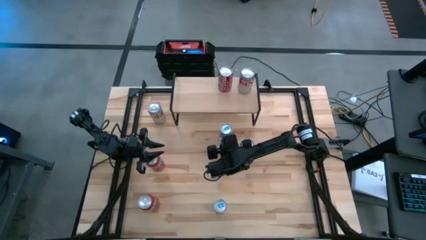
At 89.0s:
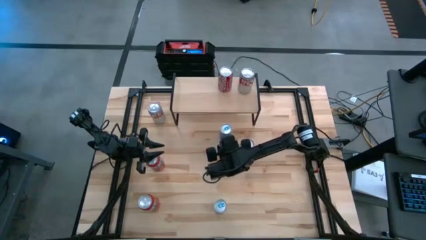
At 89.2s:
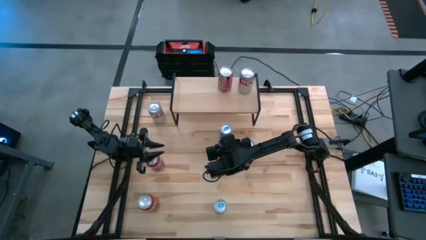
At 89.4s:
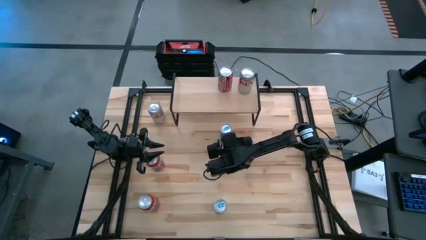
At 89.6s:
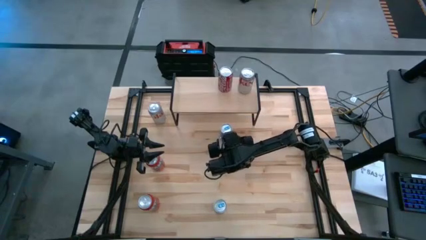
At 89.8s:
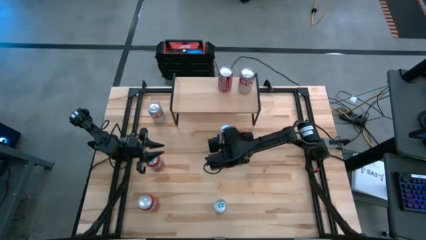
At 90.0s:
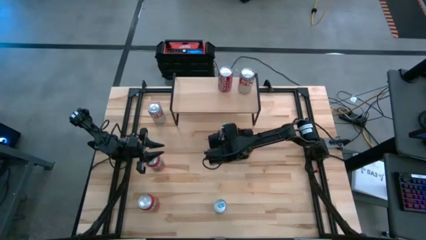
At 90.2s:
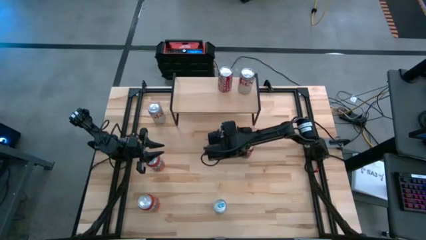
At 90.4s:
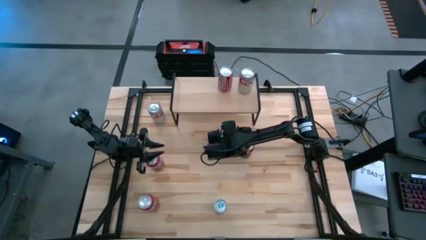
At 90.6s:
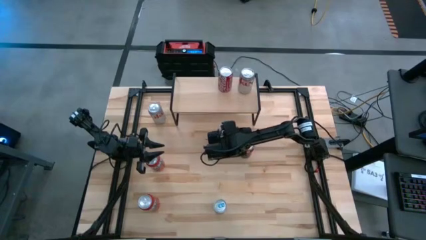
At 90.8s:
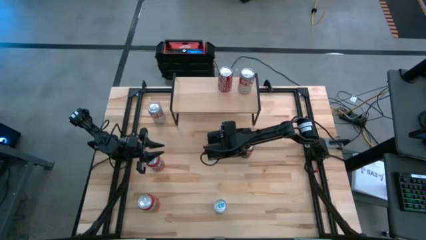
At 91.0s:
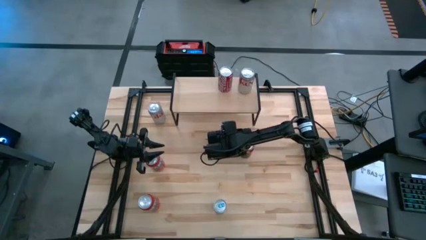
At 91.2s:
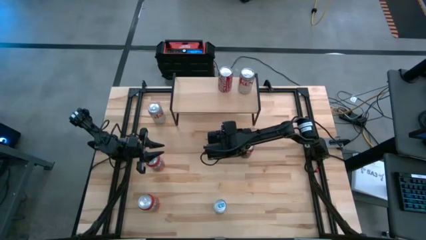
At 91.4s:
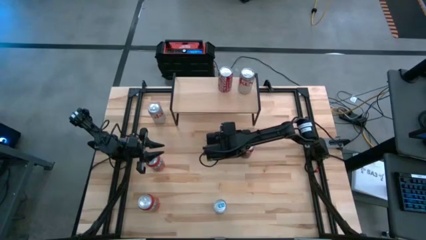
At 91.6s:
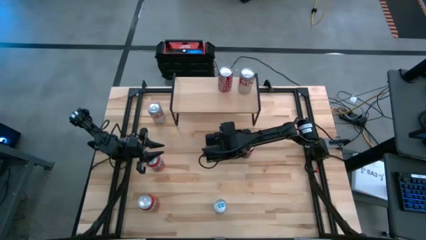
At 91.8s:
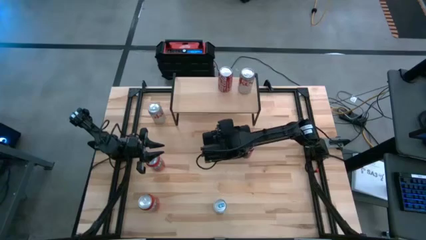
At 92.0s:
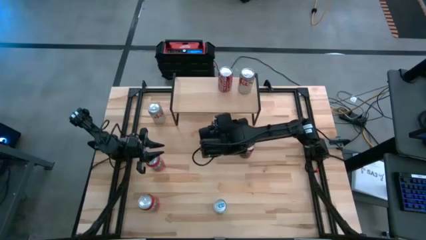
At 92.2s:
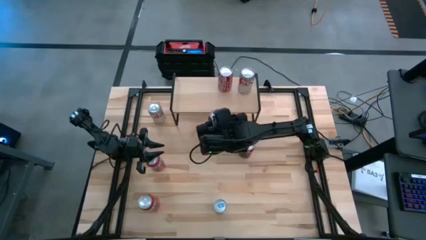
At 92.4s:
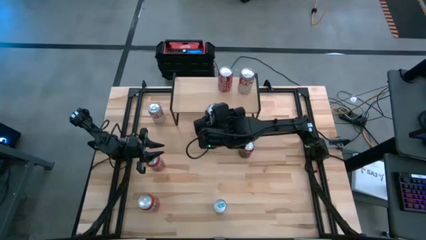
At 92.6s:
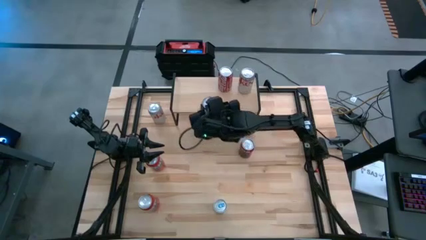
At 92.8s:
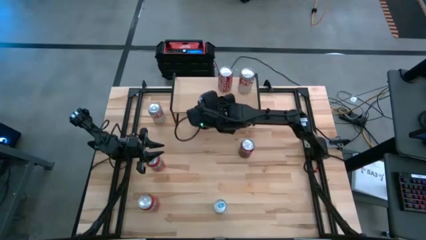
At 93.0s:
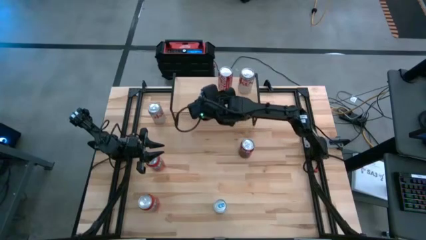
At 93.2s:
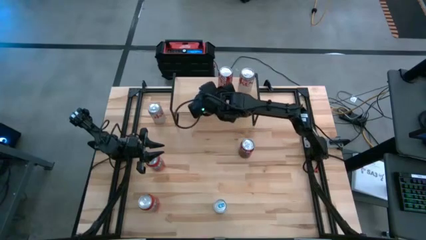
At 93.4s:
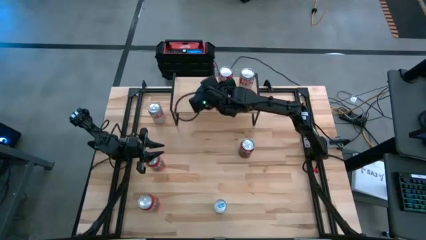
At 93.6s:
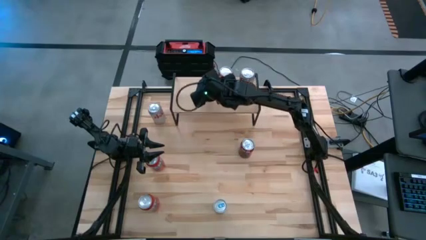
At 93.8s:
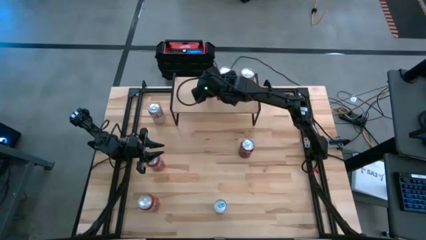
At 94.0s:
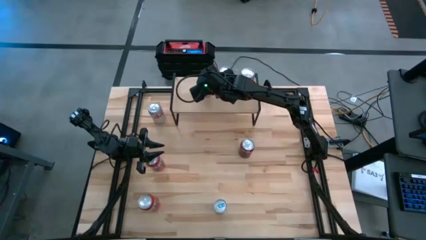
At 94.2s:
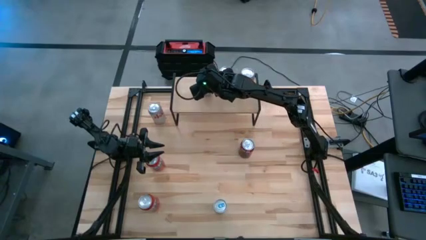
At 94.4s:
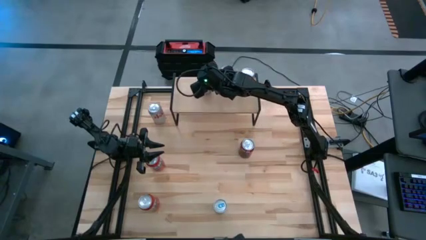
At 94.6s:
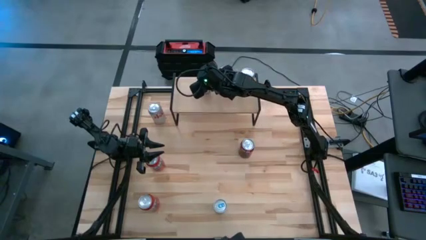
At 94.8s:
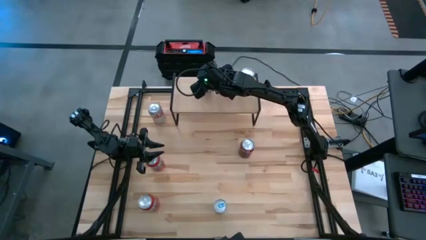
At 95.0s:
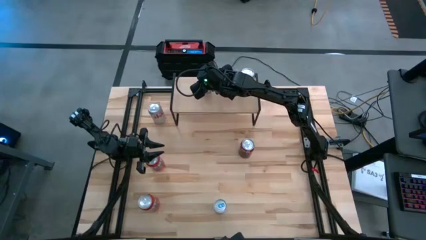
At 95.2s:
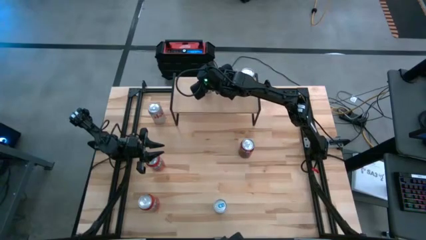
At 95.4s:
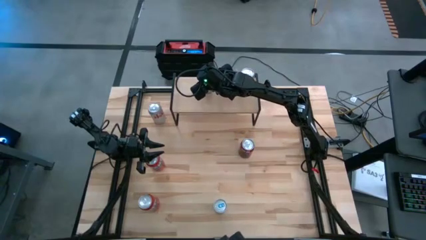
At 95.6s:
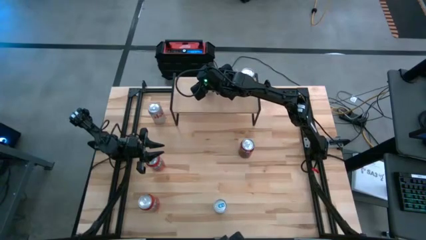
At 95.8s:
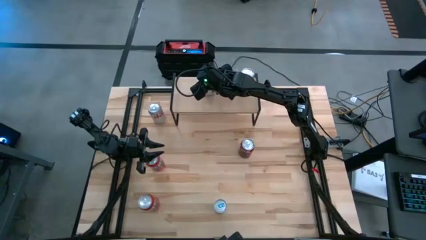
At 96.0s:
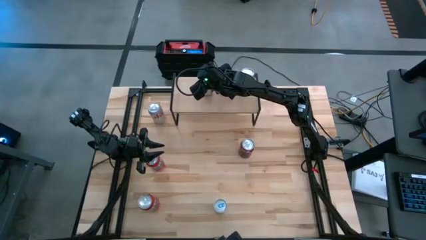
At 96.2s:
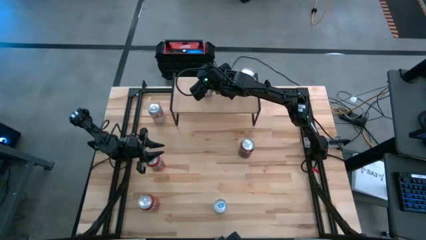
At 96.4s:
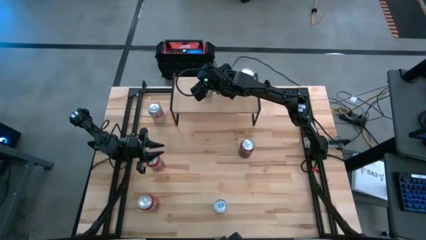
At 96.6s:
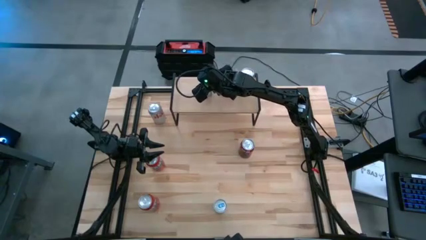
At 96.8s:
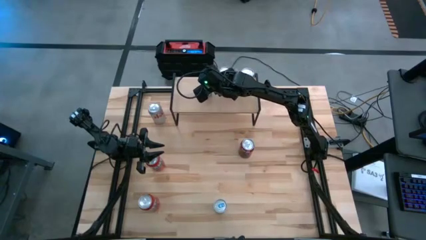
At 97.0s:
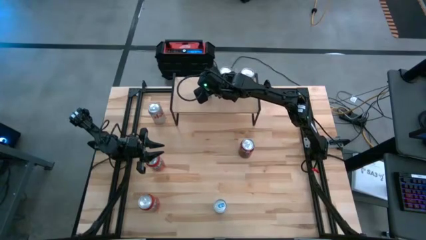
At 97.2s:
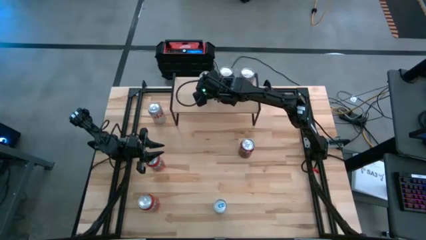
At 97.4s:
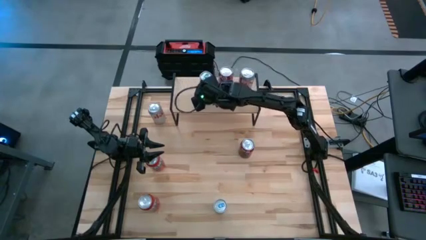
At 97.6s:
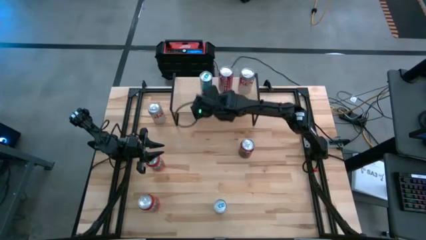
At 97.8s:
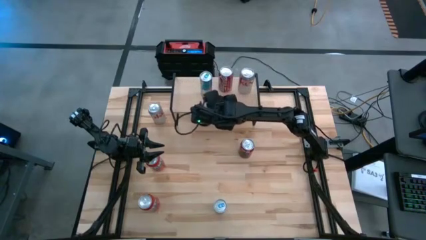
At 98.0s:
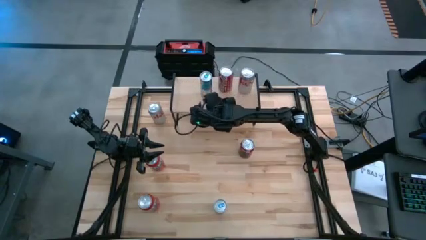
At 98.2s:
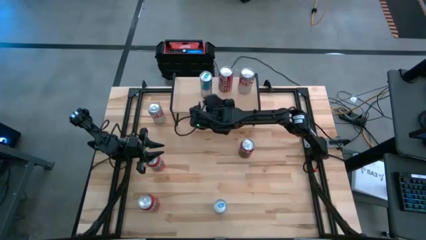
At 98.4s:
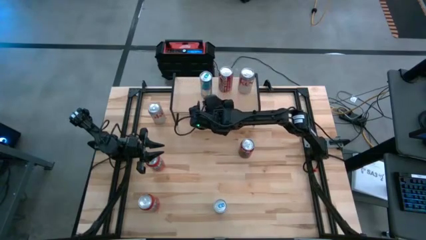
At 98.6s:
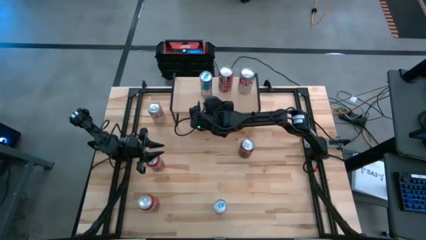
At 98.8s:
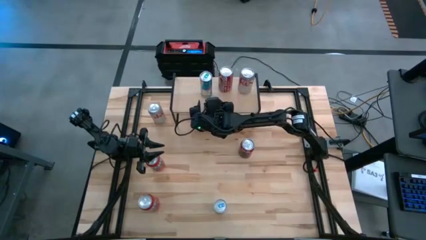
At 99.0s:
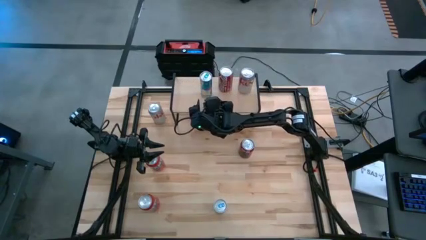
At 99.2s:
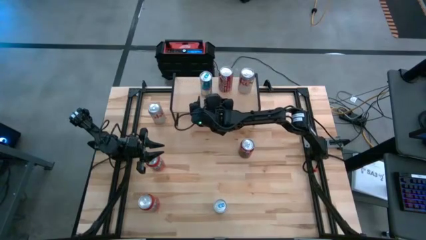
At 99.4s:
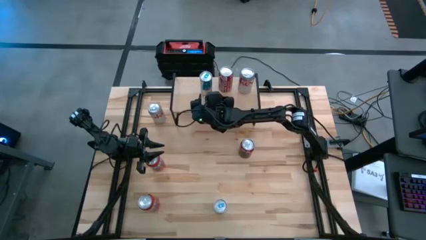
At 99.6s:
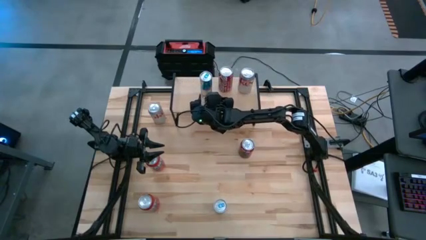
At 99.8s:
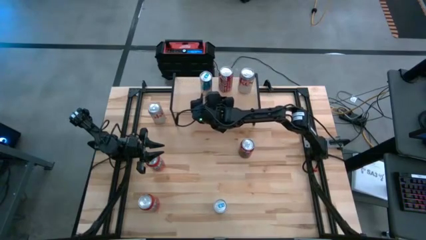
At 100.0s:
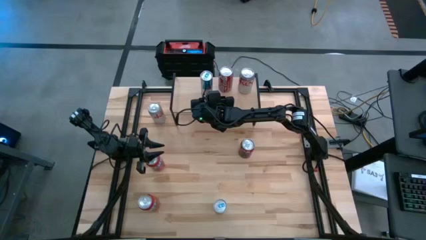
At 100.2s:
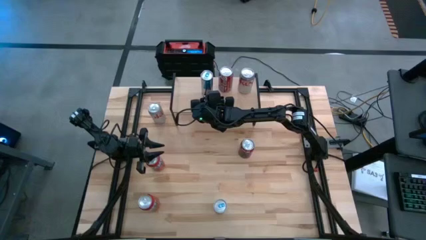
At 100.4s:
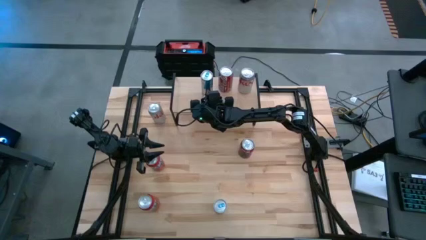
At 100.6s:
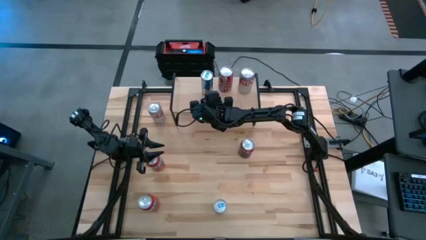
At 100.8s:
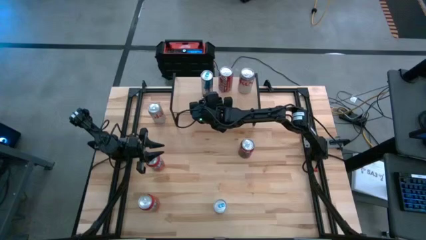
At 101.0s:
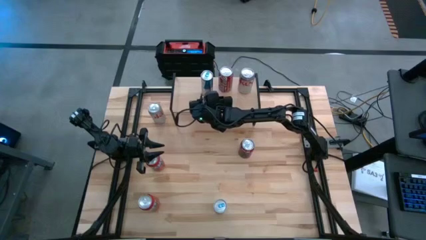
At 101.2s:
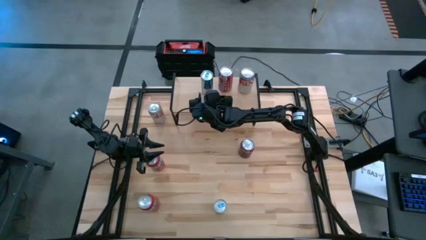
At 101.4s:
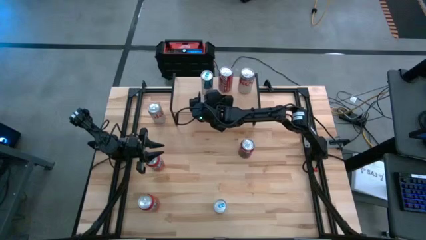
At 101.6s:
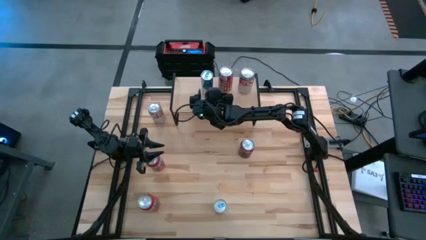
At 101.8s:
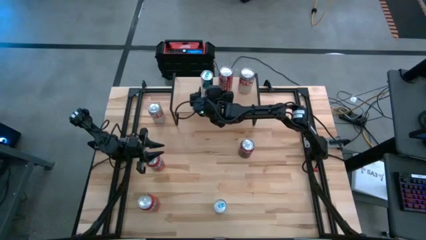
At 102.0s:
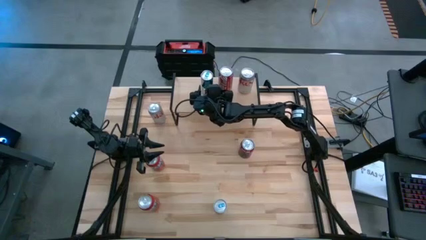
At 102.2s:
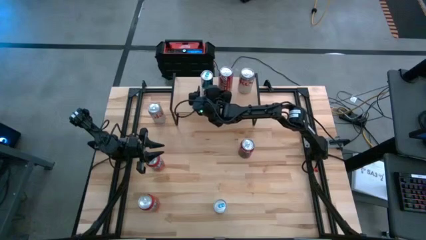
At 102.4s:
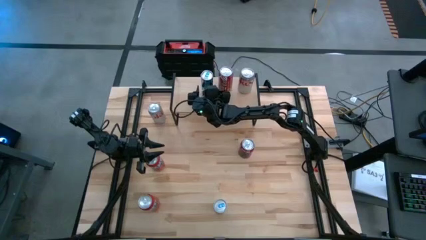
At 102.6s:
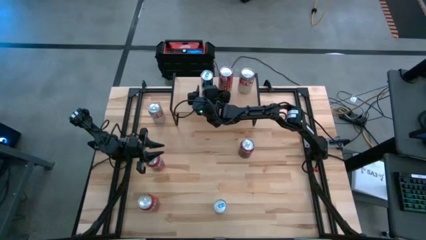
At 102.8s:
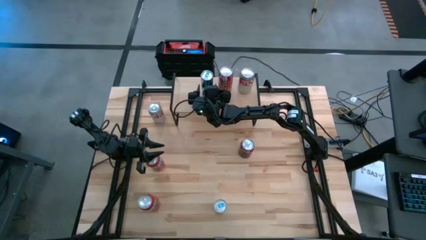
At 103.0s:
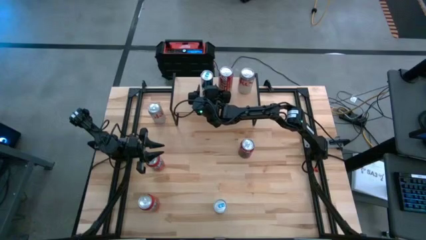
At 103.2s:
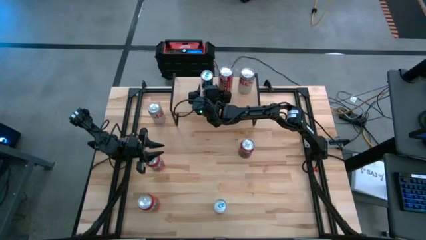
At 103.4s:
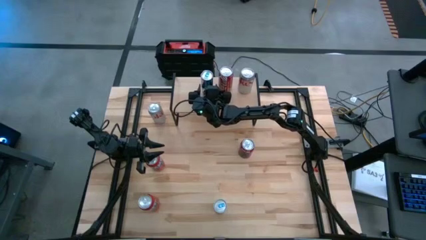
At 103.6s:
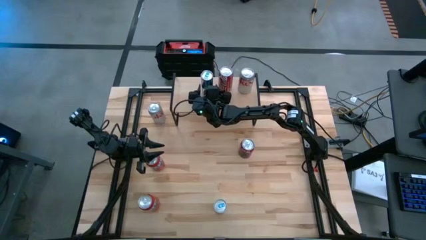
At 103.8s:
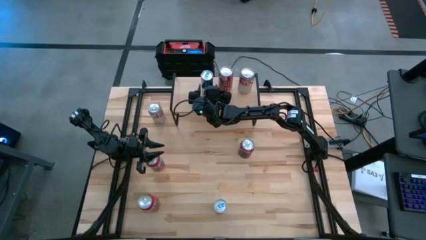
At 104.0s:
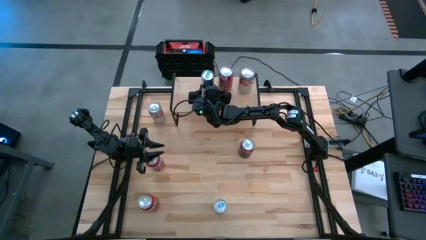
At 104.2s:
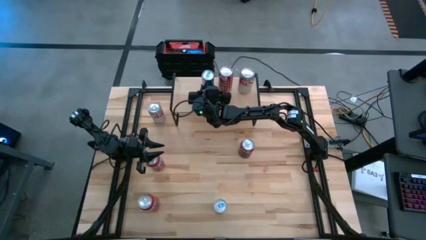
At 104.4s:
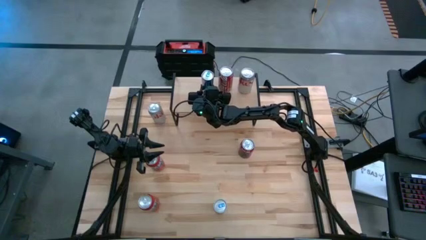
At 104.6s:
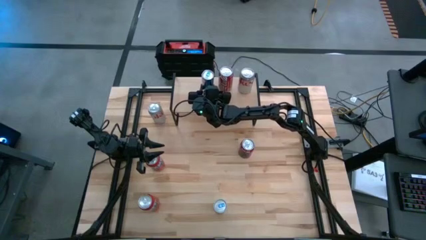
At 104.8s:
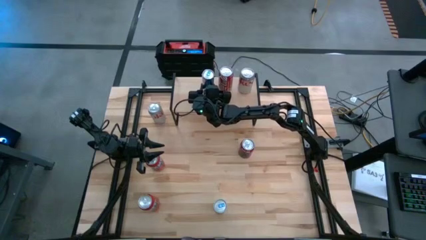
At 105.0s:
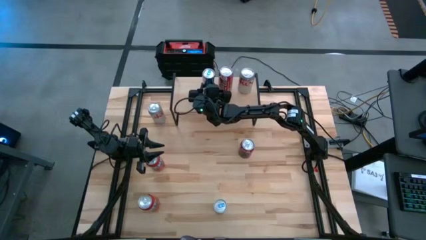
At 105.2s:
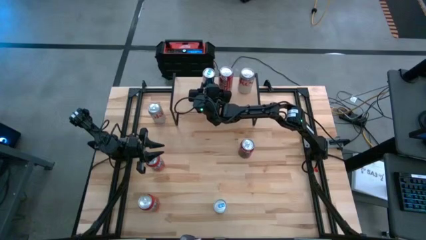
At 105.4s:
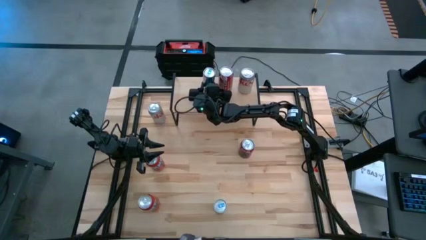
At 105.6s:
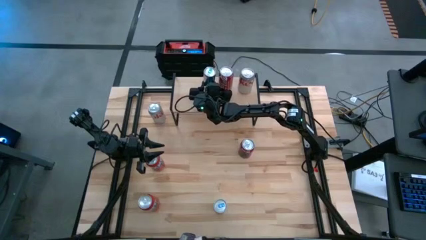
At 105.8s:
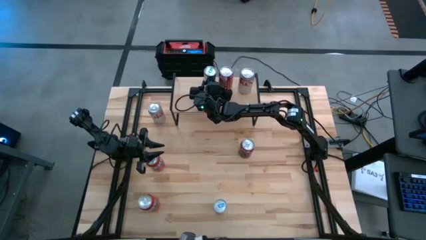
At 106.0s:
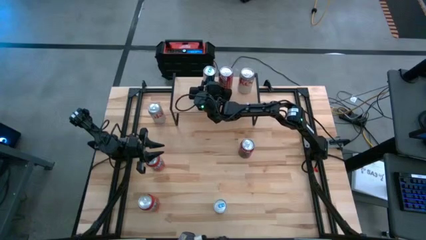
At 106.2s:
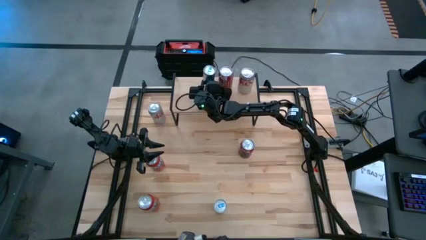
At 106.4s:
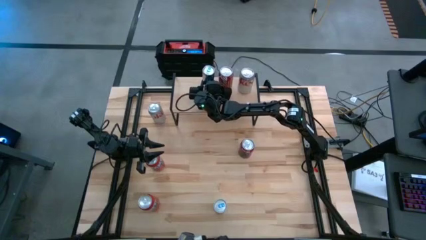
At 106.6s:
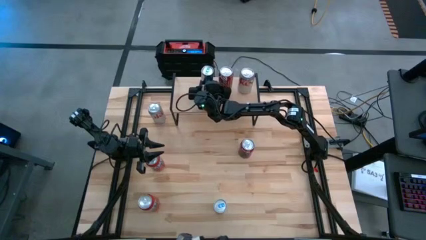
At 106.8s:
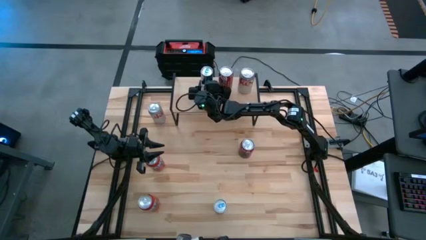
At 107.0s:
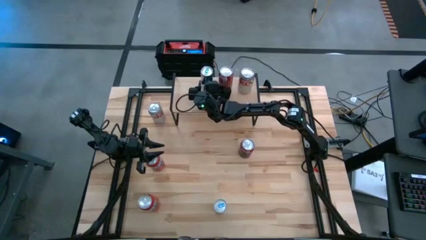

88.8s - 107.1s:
Task: Place canned beverage on shelf
Put the top blue soda can on the shelf
